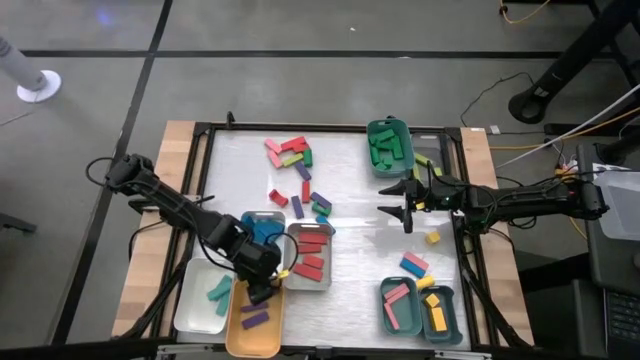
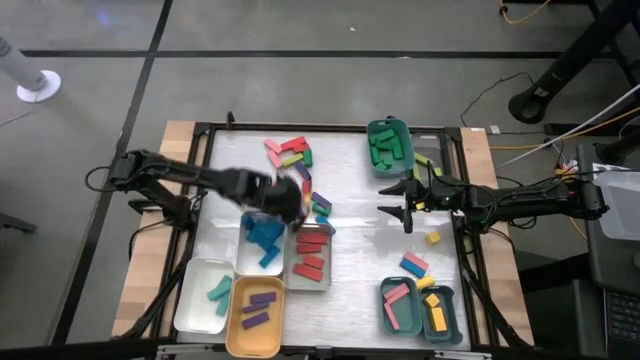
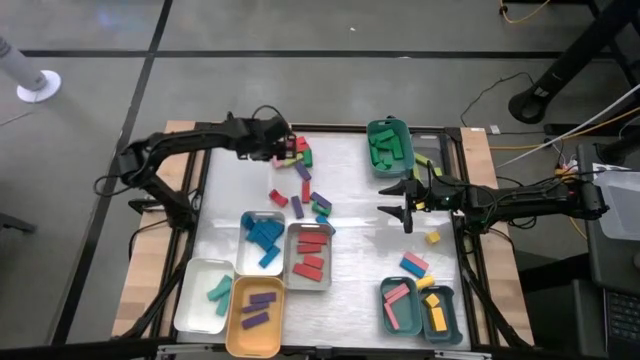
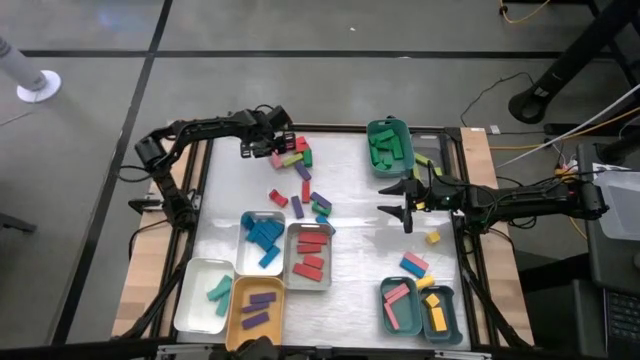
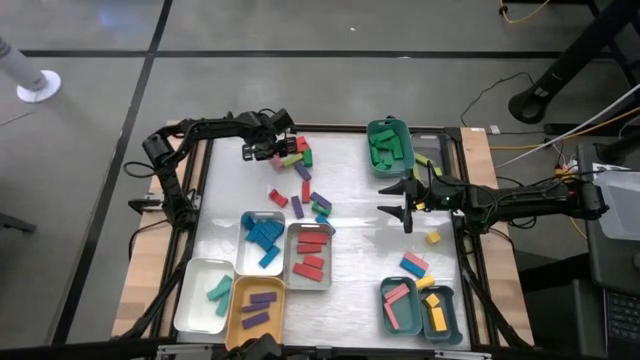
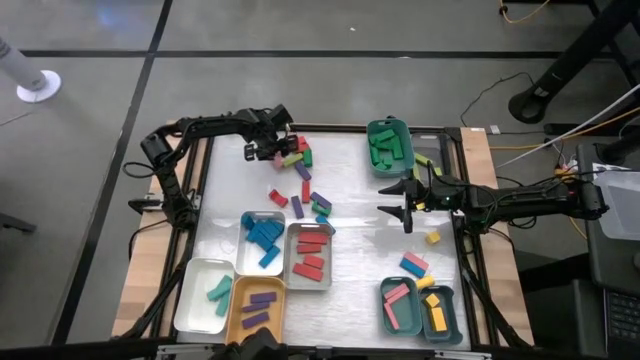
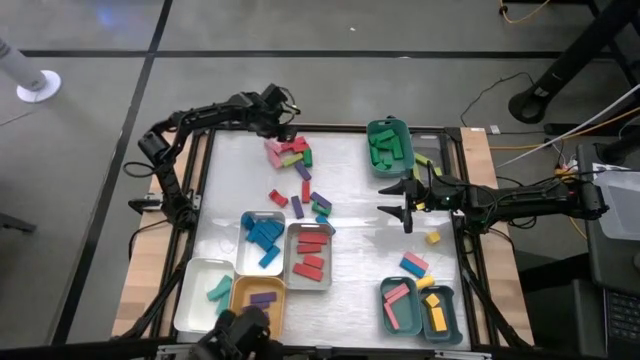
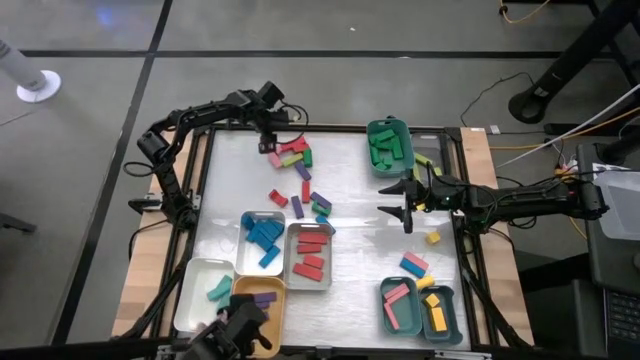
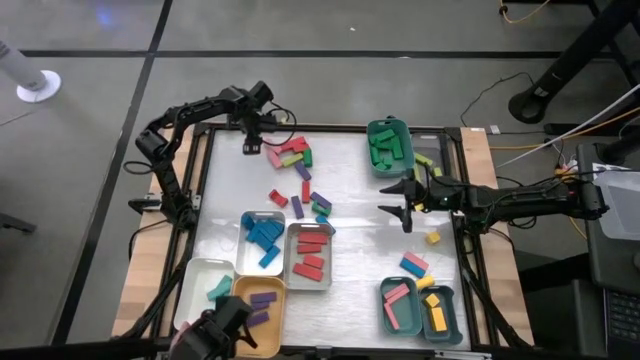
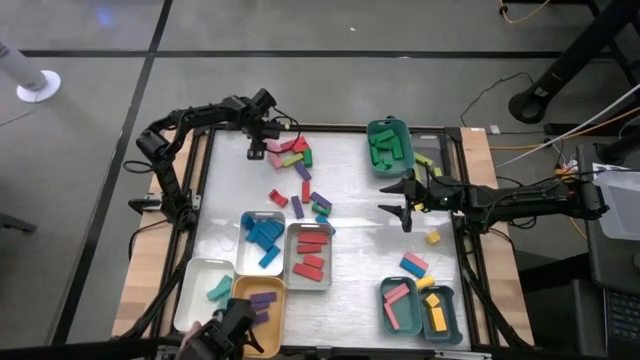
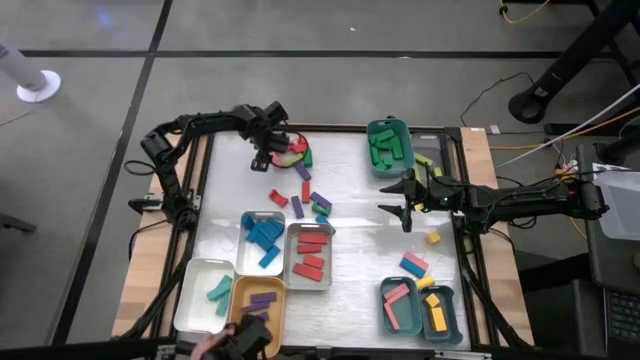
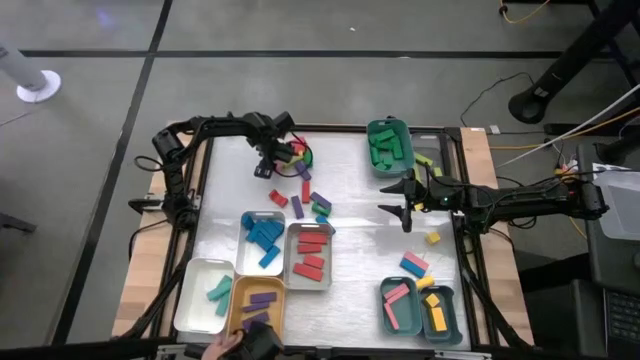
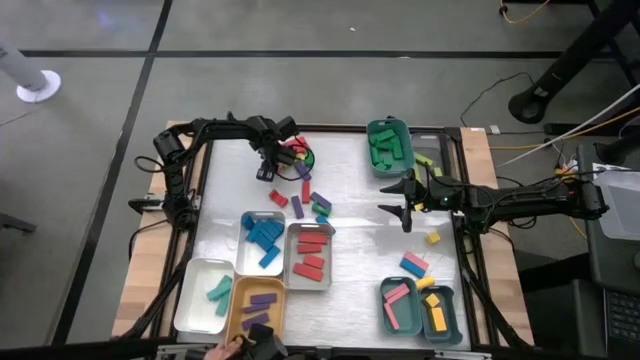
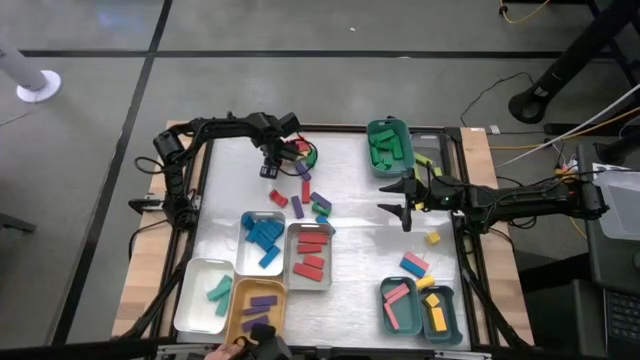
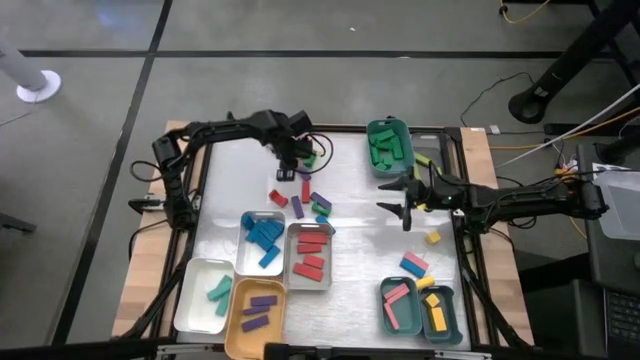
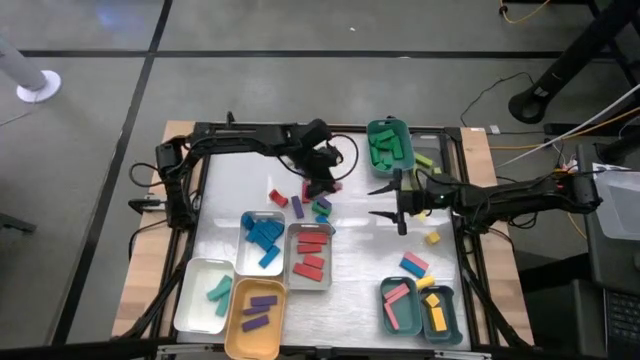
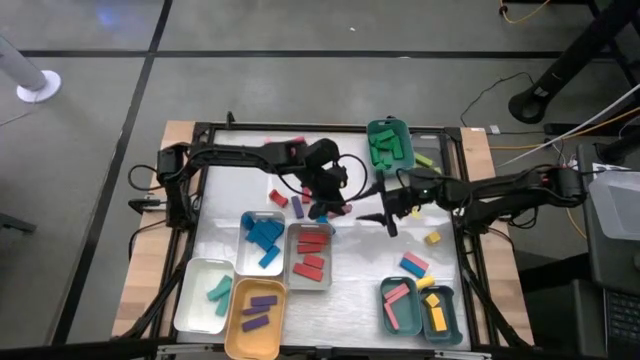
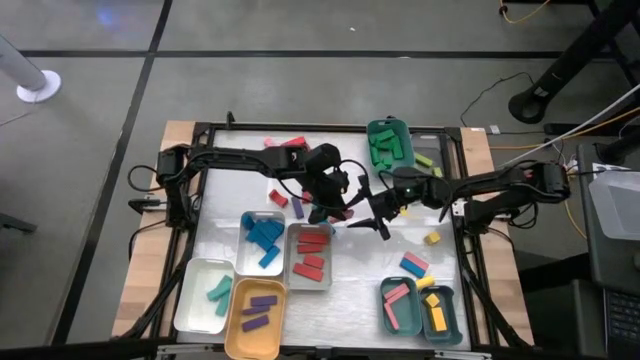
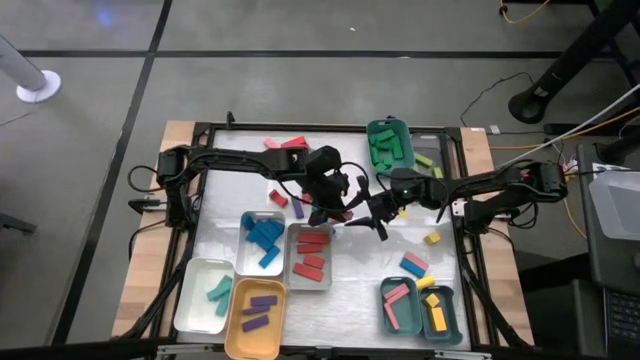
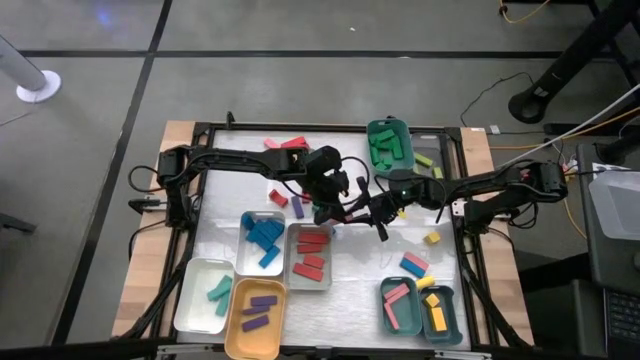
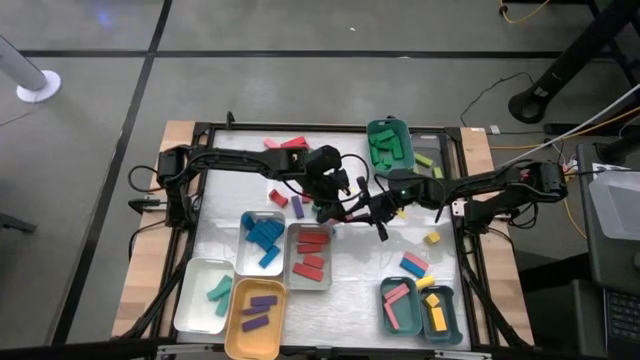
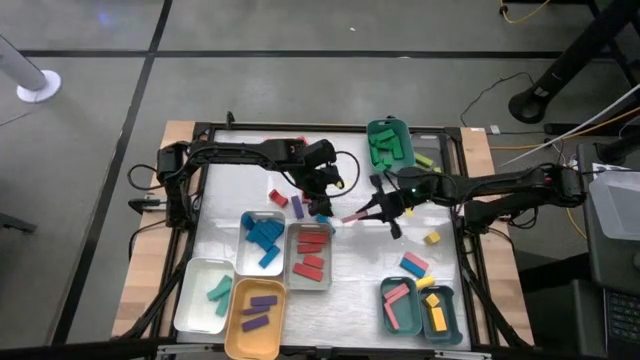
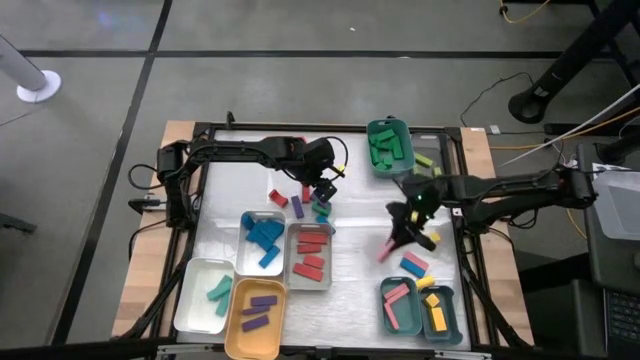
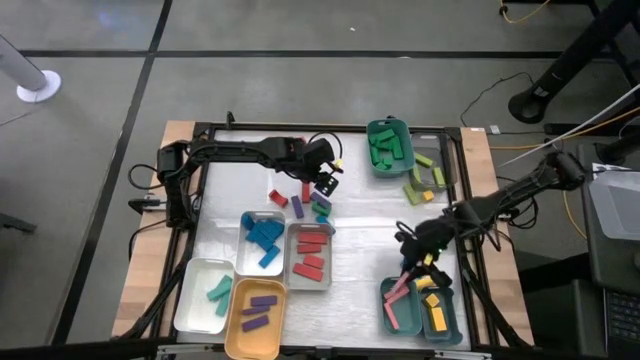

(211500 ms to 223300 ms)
Task: Sort blocks
Put the pink block into the bottom green bin

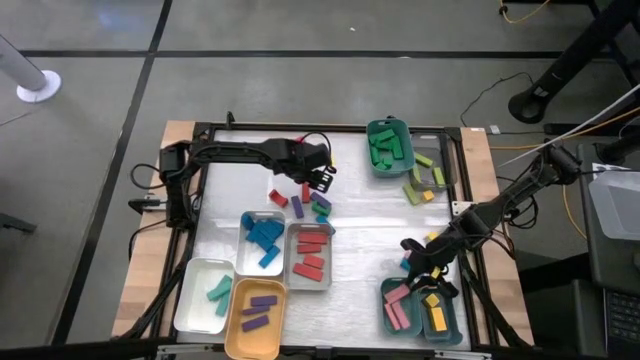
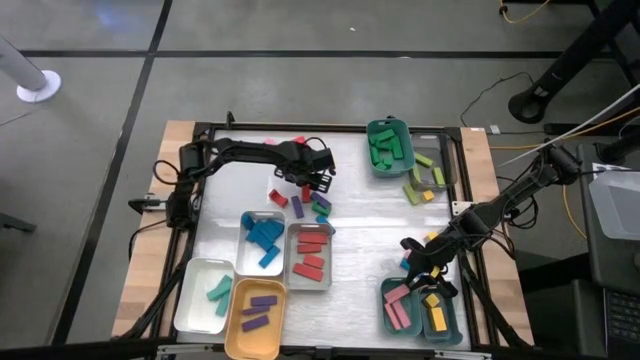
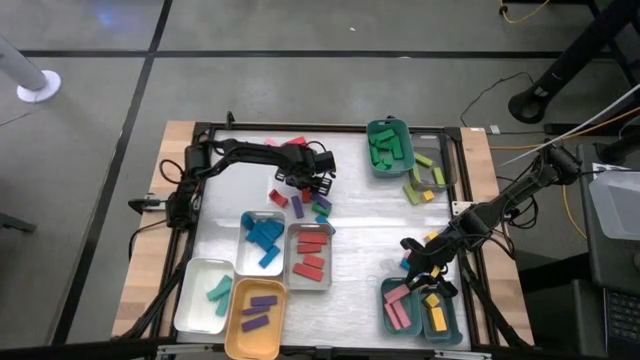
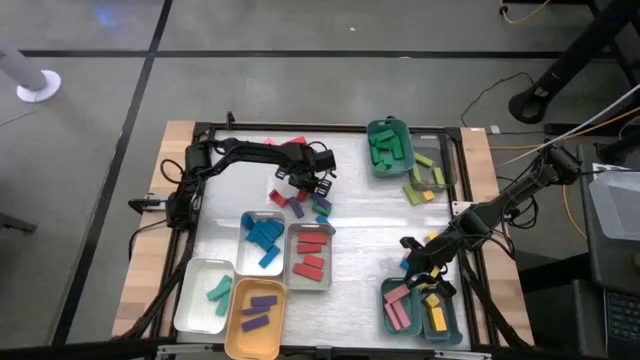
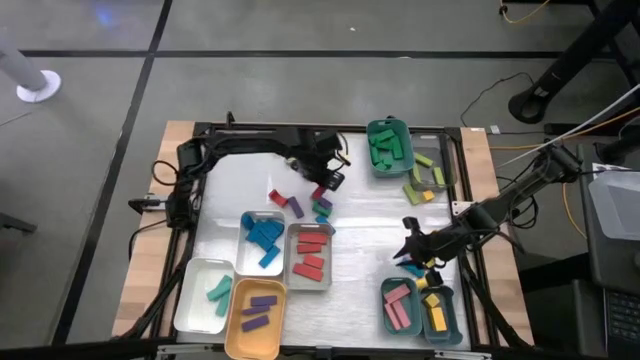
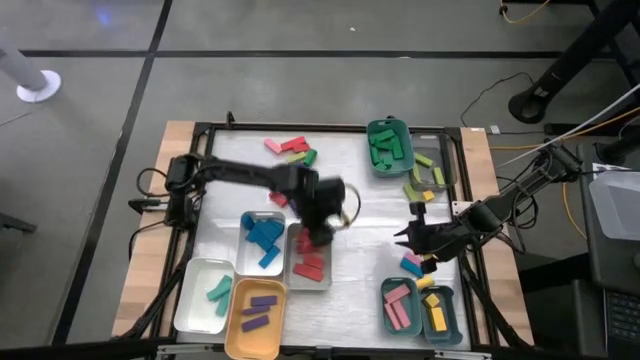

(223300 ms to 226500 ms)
Put the red block into the gray bin

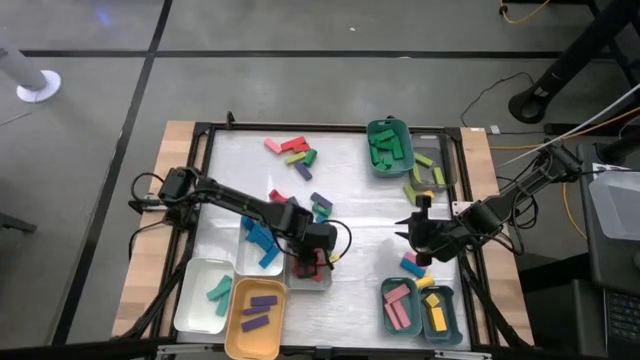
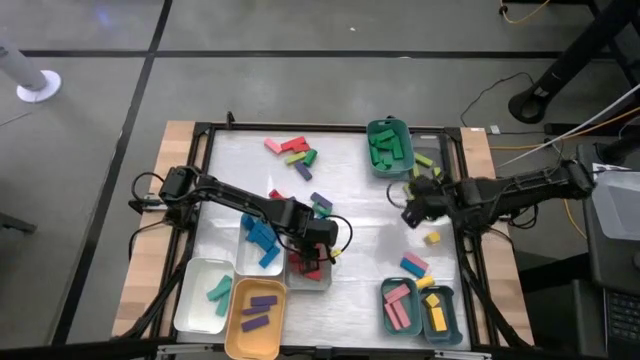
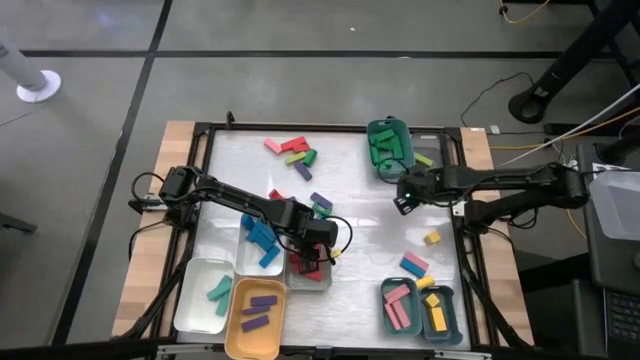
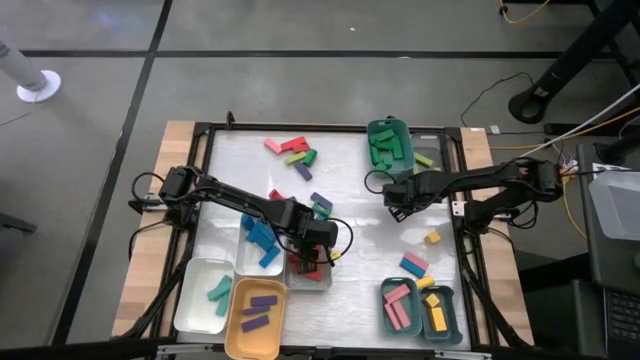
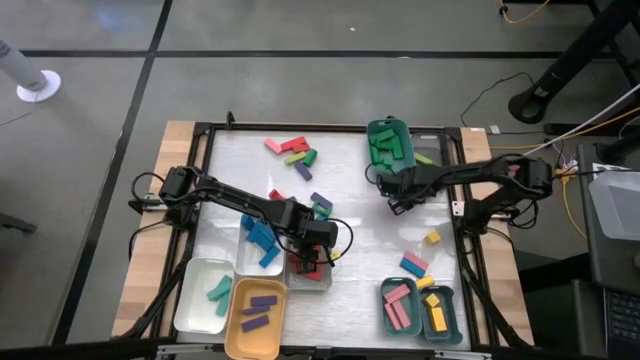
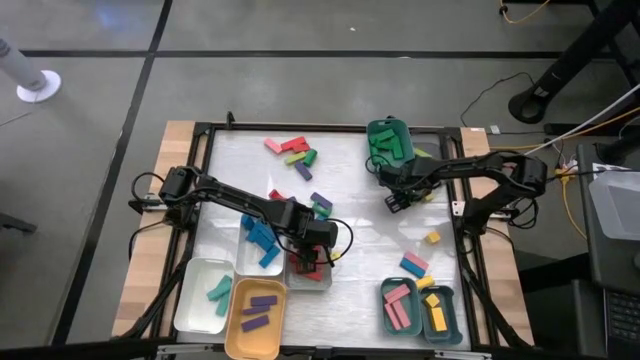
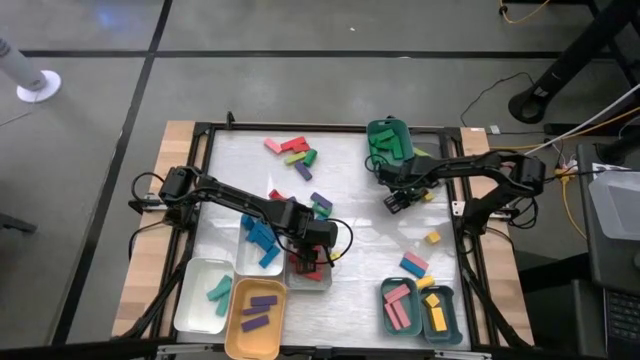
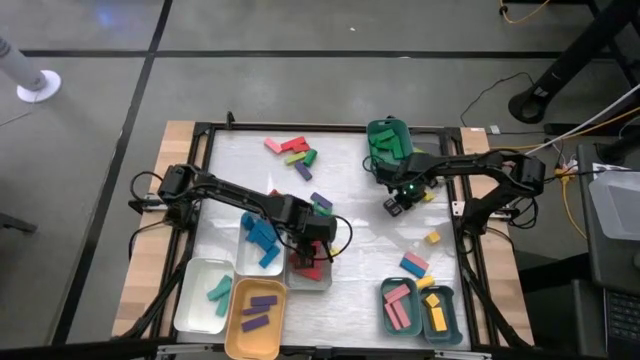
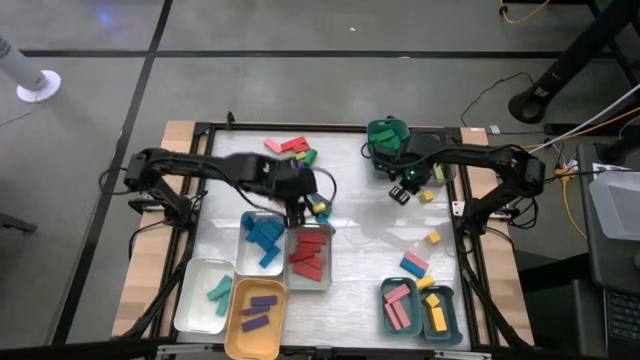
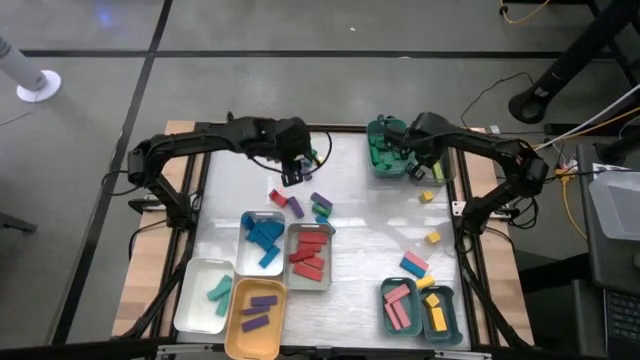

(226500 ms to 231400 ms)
Put the light green block into the black bin

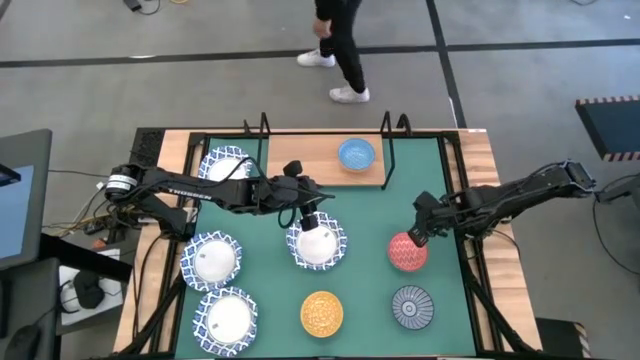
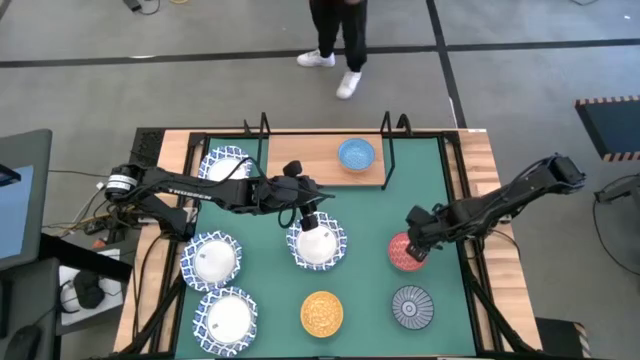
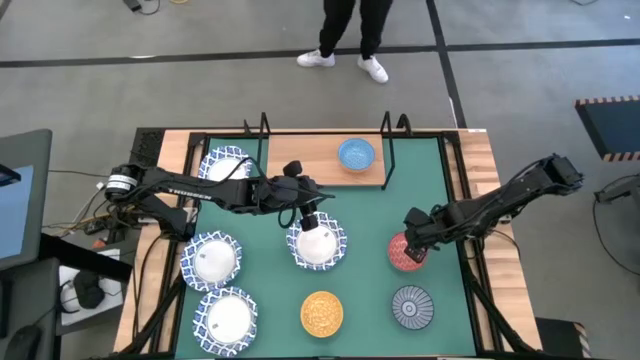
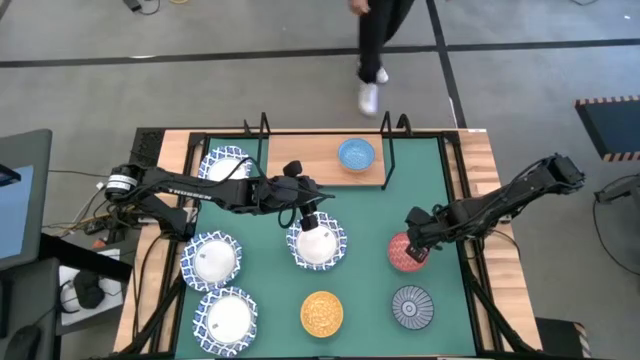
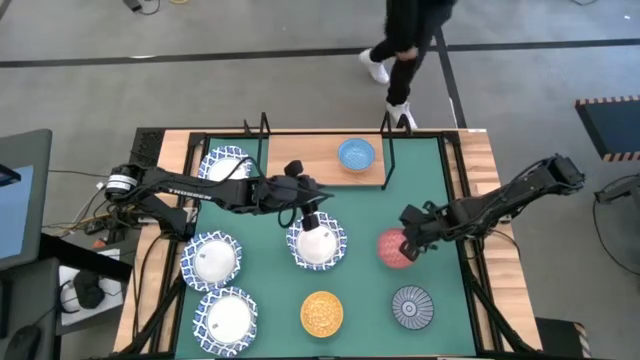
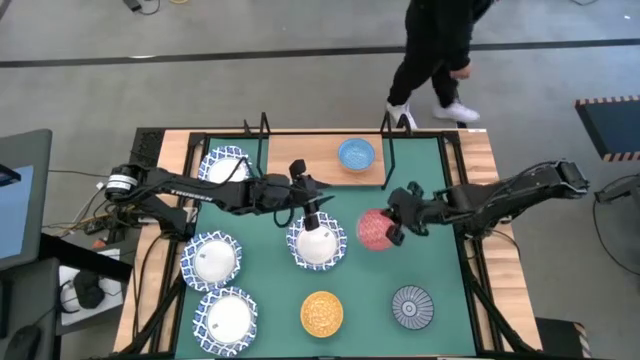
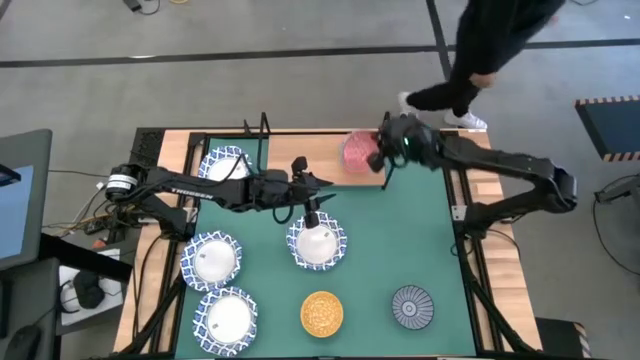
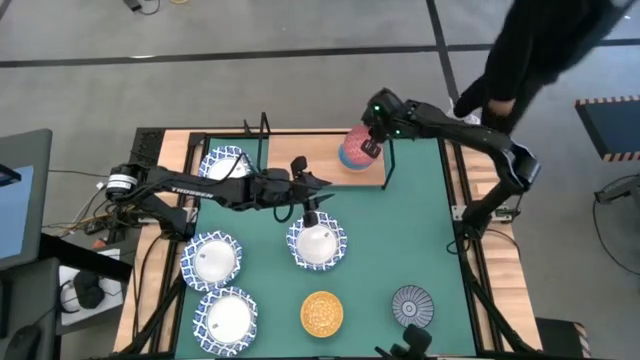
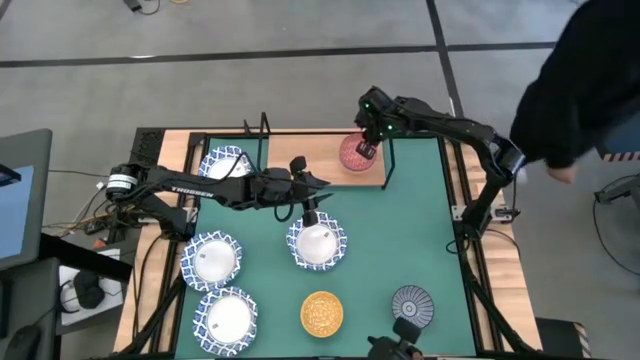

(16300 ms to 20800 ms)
Task: Place and stack bowls onto a shelf
Stack the red patterned bowl on top of the light blue patterned bowl
